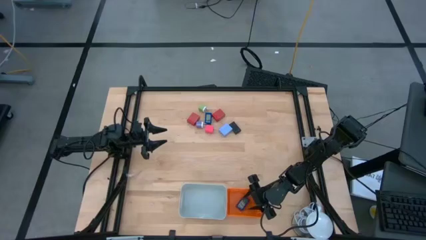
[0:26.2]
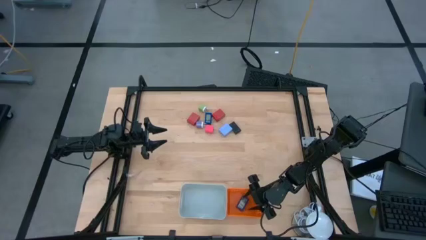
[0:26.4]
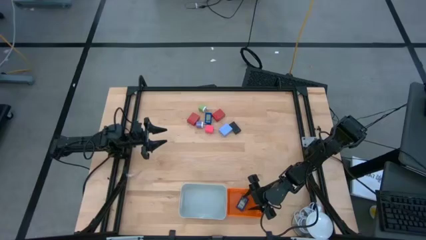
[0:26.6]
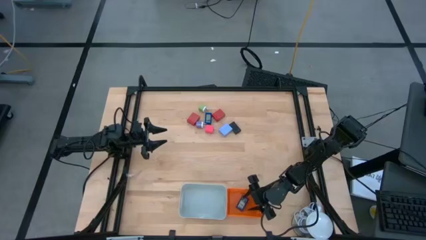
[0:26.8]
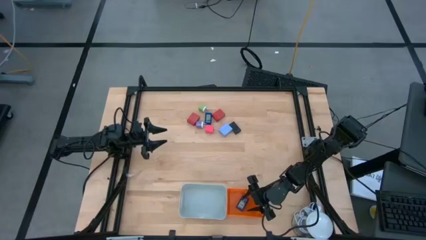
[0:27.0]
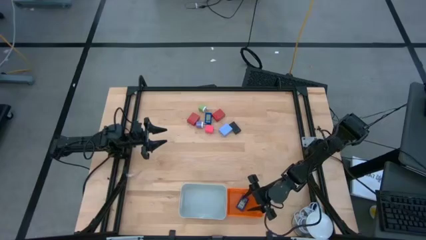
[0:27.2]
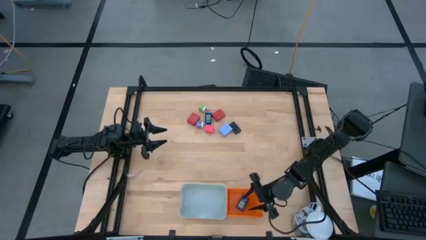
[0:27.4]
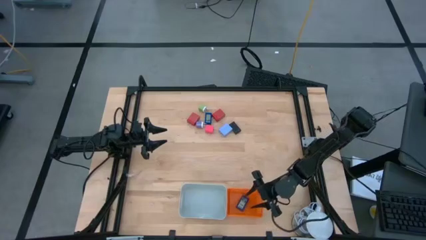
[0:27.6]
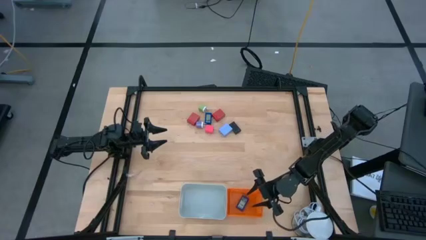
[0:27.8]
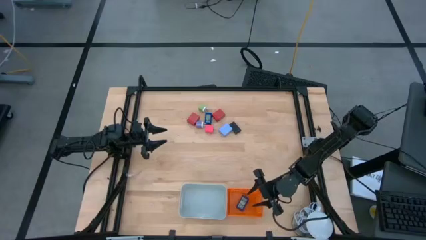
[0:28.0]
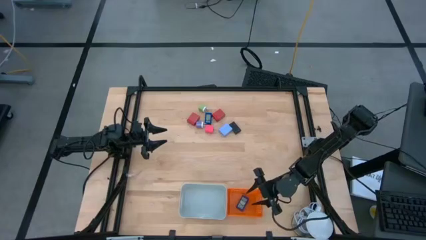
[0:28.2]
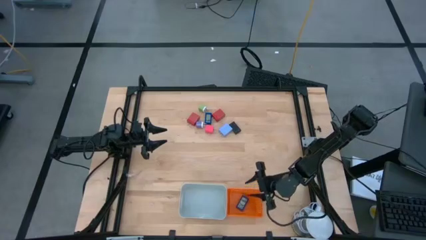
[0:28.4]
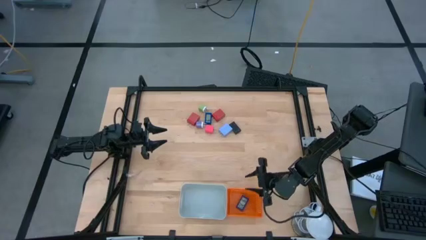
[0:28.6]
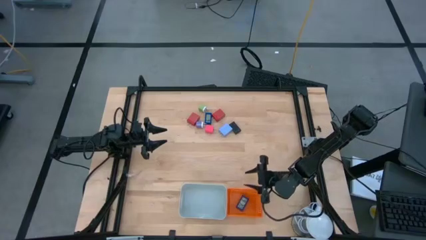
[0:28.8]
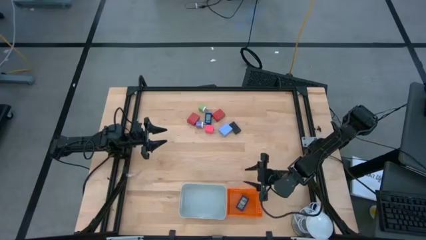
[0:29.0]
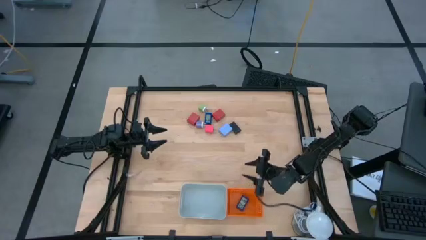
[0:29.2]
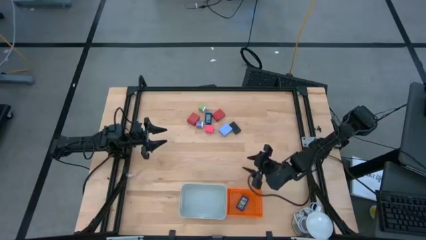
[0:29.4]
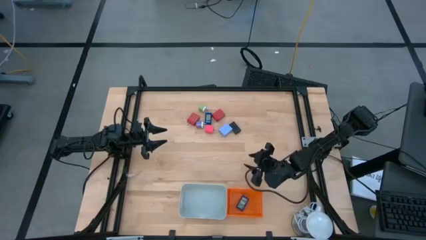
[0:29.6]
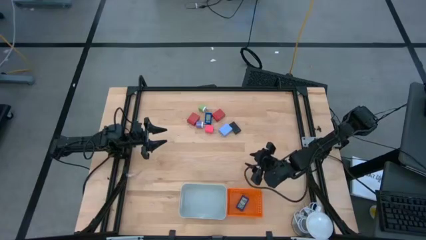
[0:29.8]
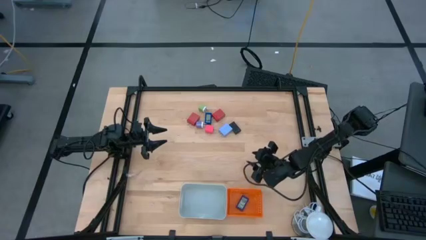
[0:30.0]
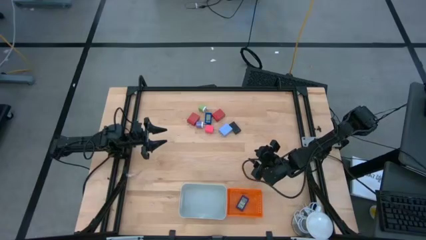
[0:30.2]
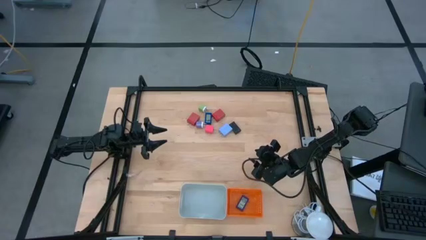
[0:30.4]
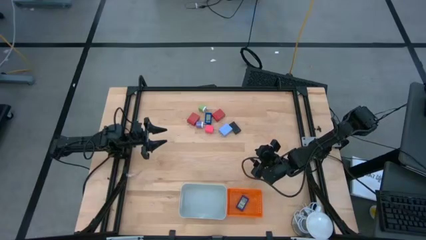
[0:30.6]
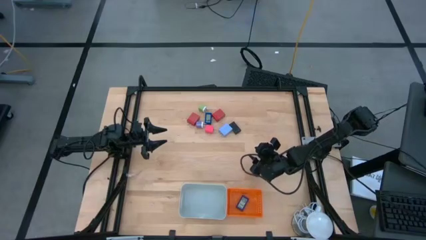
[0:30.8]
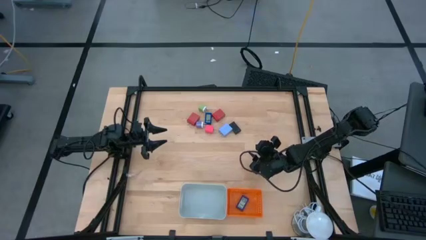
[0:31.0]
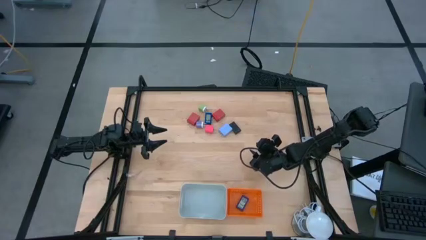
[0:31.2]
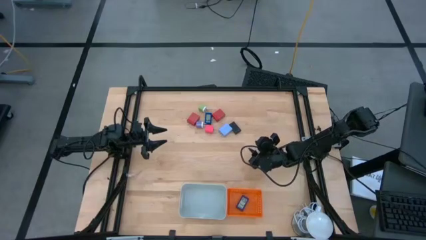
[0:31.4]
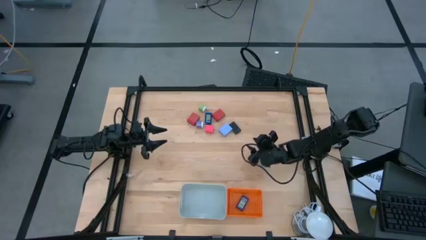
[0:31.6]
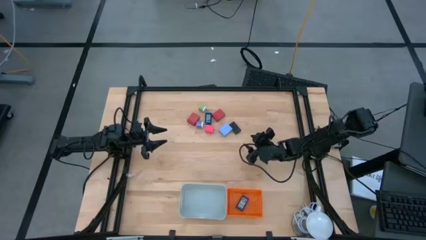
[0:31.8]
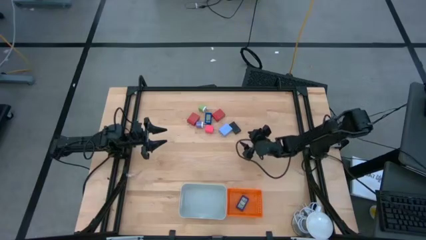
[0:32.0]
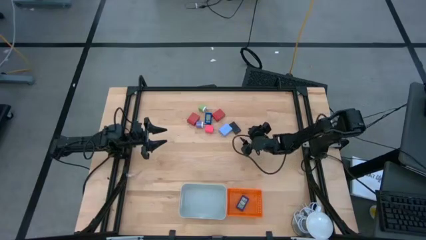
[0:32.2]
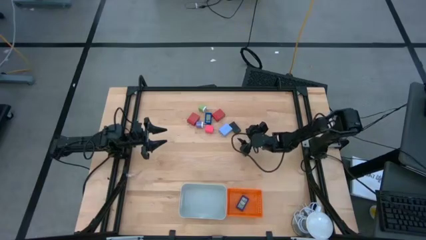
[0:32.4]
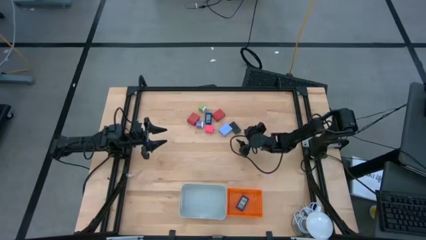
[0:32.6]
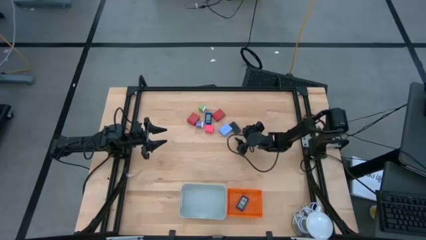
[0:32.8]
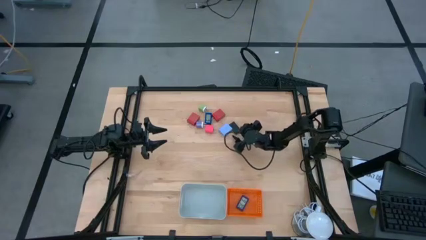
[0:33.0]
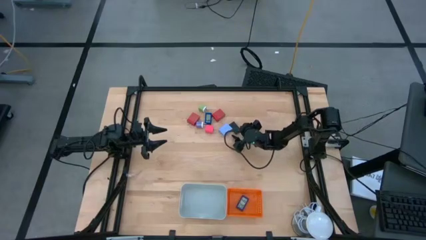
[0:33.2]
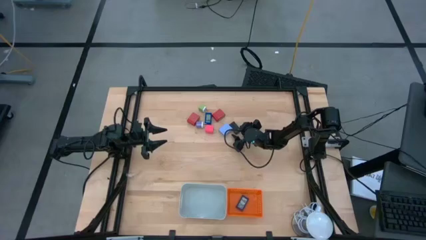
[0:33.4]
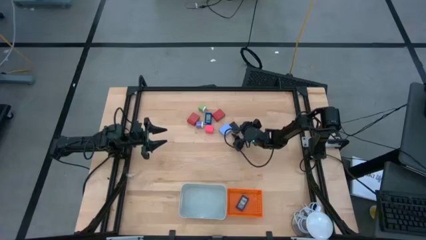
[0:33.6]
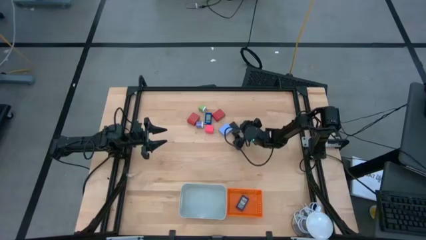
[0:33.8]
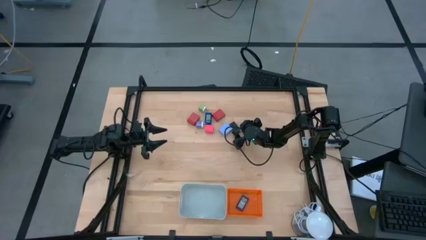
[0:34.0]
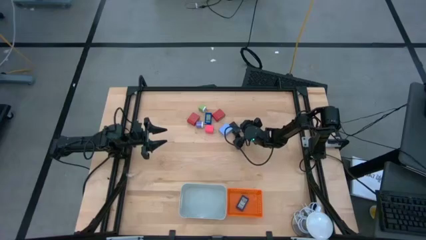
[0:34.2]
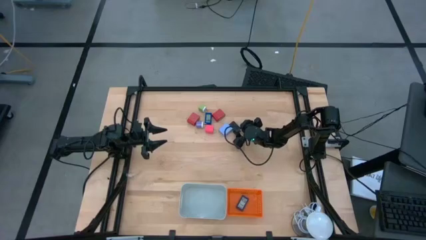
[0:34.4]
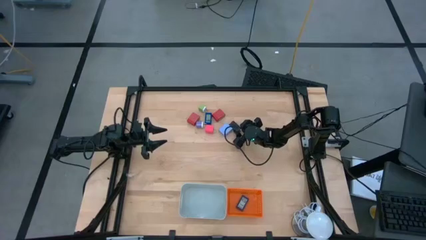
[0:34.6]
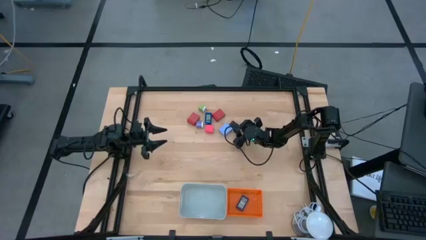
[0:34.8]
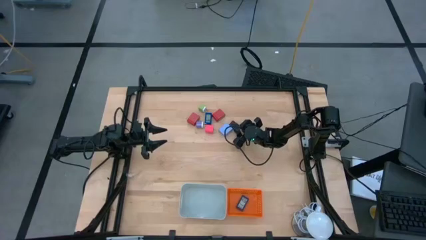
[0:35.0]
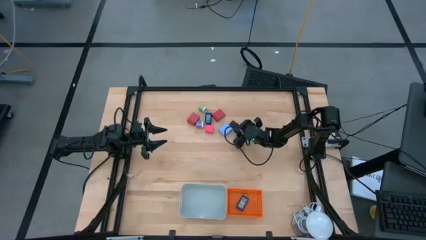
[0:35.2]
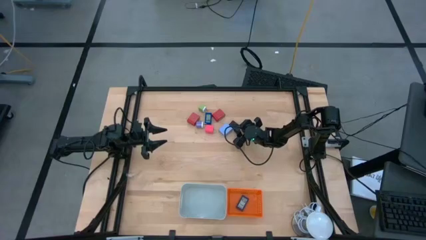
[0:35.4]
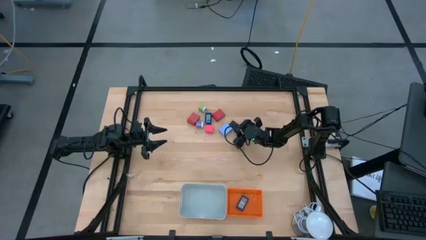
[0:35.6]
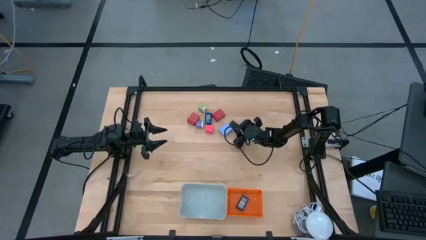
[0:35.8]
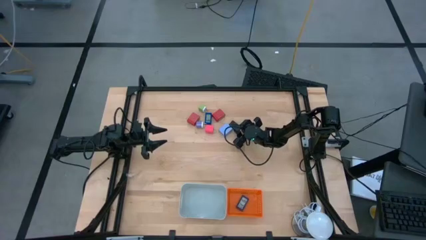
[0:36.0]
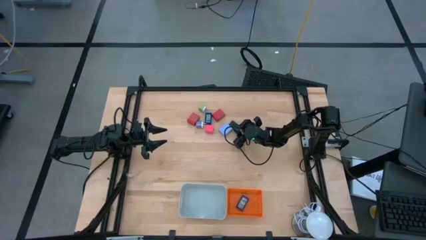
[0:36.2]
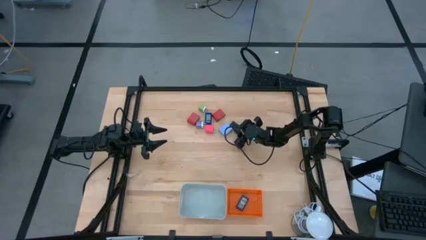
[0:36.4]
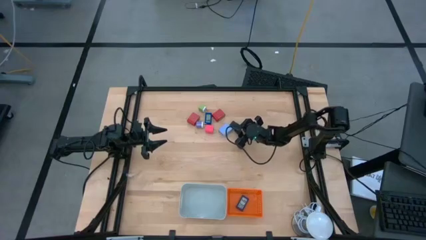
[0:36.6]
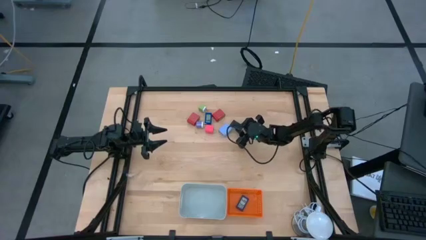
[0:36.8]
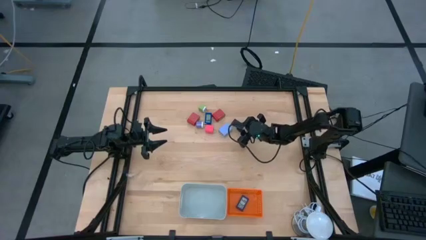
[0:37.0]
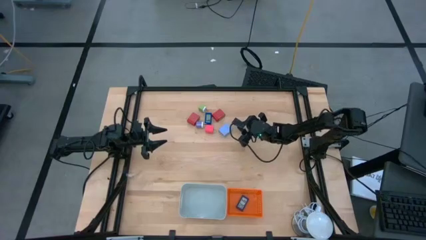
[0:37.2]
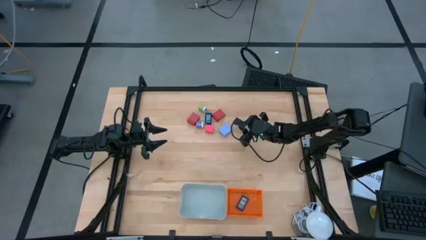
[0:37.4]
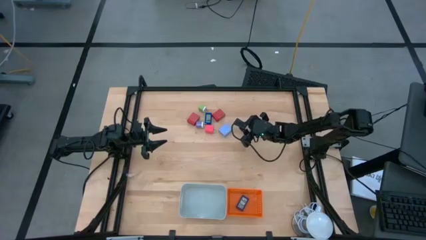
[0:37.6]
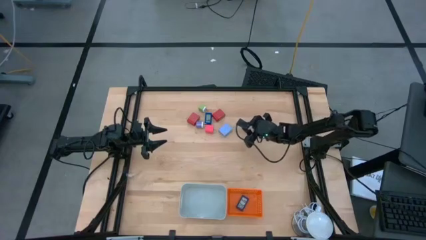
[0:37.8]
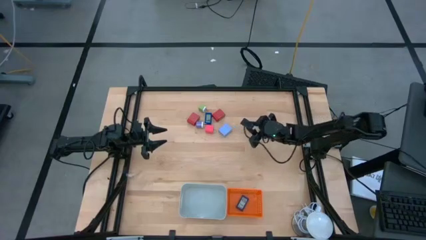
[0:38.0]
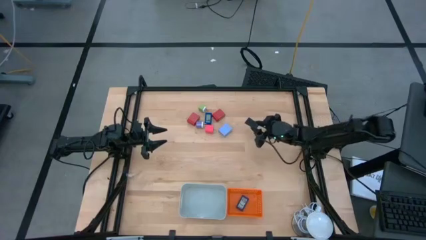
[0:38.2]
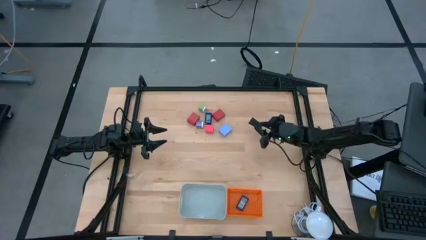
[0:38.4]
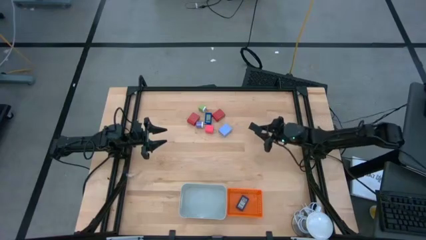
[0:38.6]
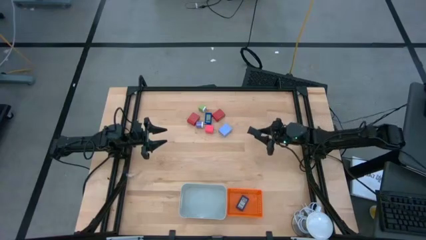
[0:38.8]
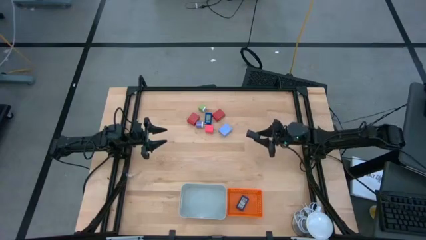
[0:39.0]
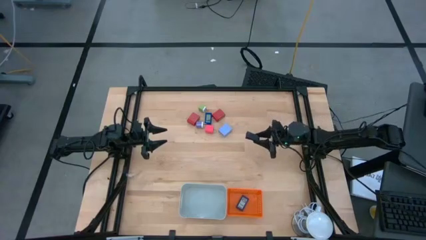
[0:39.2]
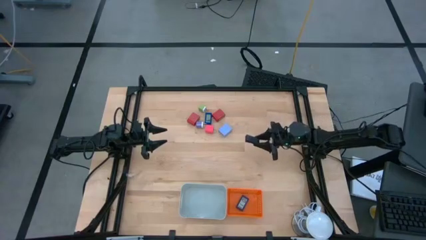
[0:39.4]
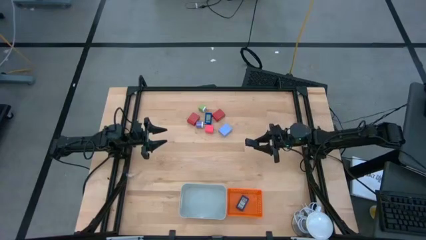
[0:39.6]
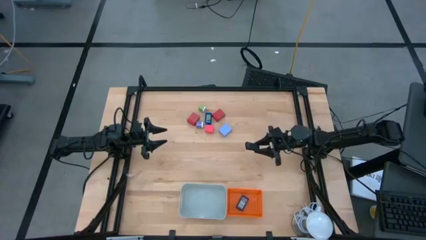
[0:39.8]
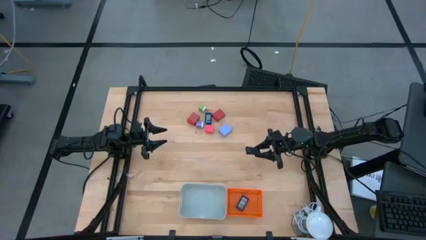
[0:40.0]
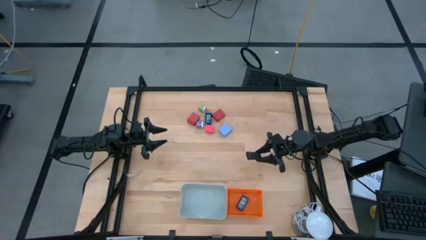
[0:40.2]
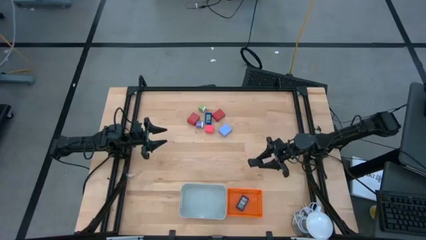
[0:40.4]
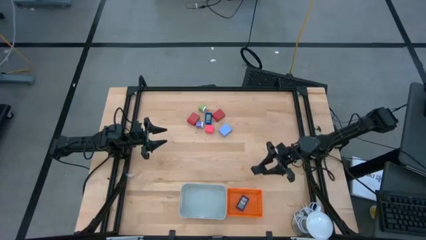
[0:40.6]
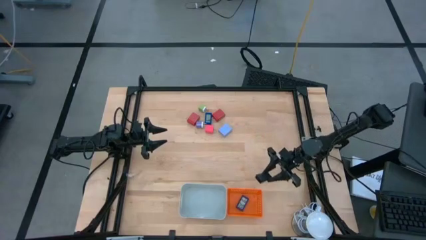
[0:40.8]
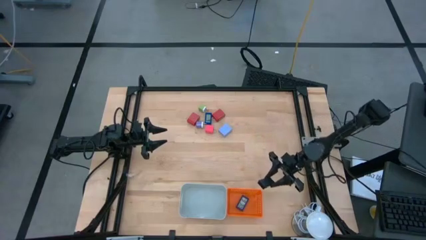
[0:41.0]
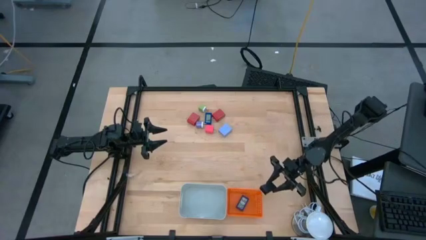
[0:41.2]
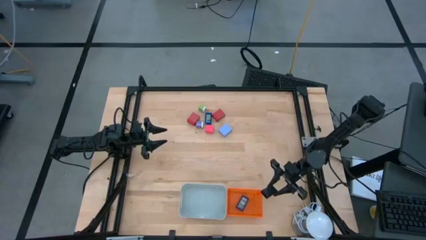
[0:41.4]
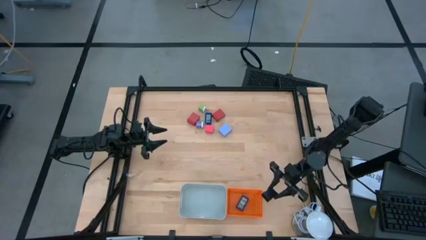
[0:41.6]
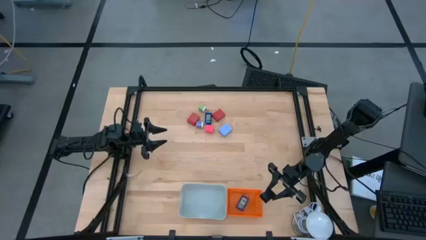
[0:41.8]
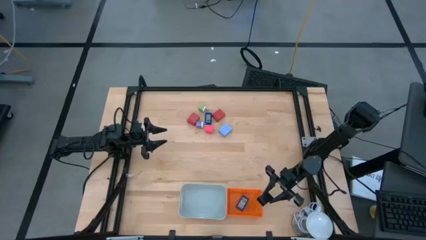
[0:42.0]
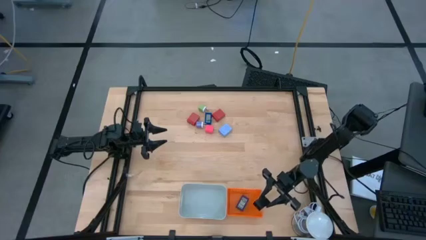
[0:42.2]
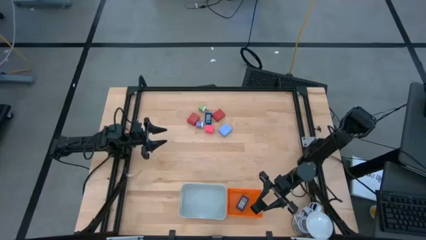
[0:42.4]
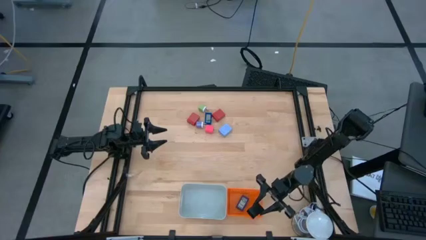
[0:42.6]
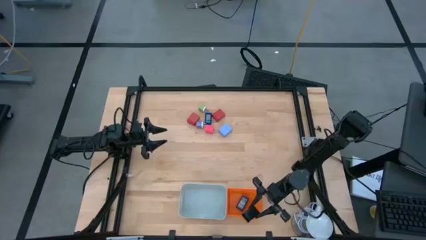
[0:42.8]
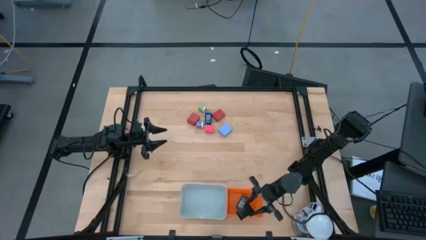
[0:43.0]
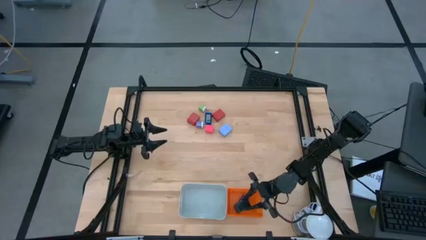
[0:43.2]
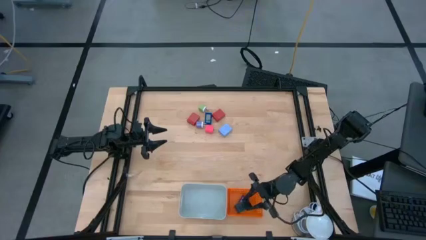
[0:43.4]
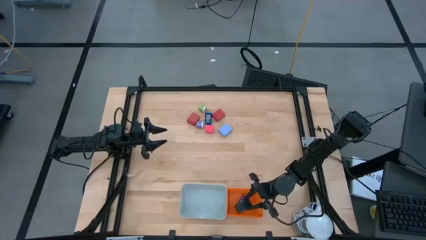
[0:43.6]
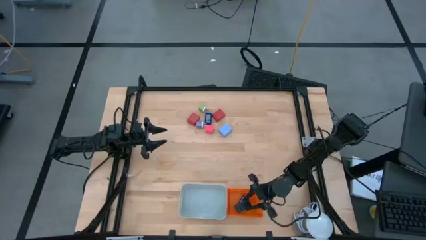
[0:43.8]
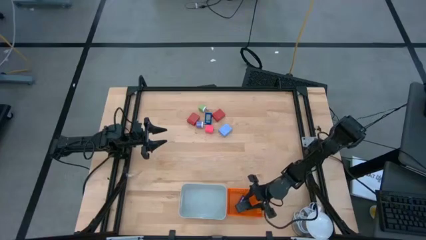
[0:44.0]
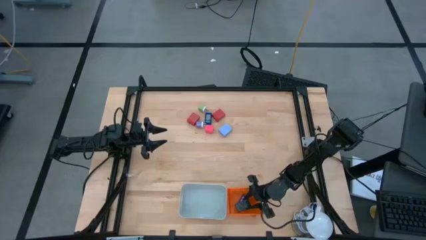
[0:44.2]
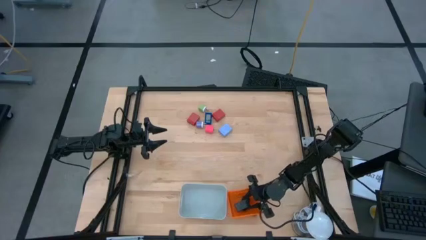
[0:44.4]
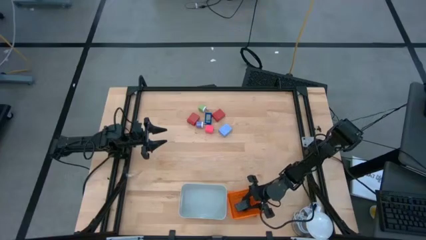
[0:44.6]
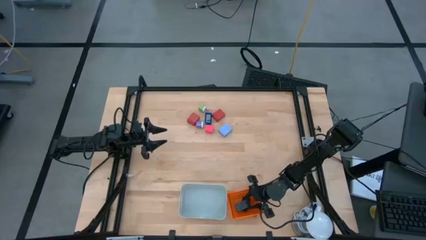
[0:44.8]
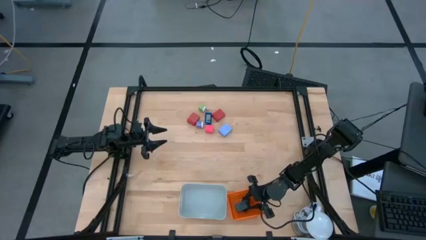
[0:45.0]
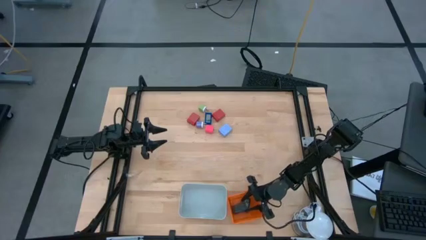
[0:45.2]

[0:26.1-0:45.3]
Task: Pick & Place Office items
Put the black digital timer into the orange bin
